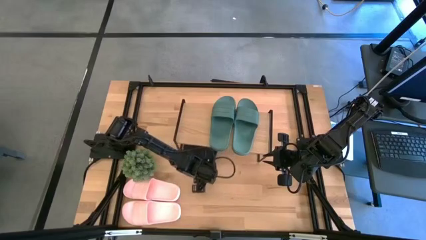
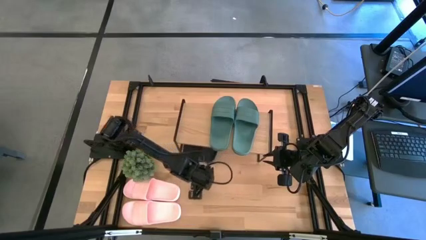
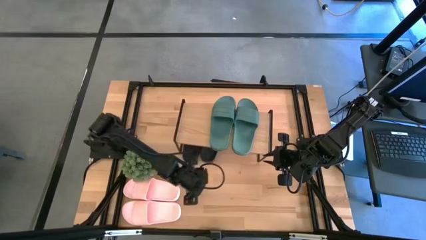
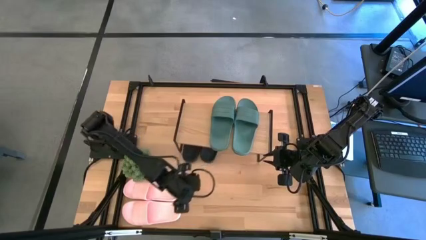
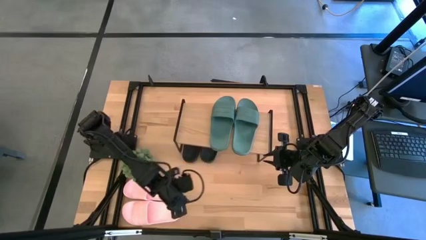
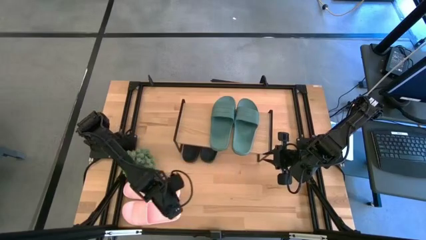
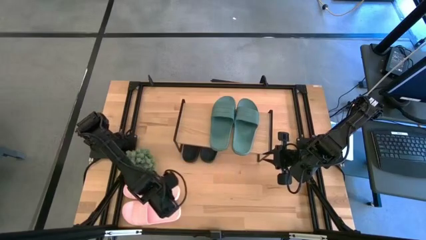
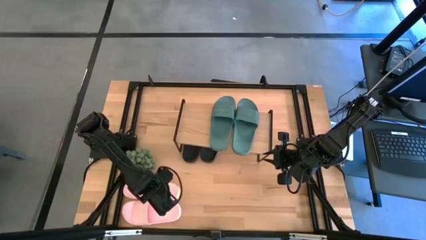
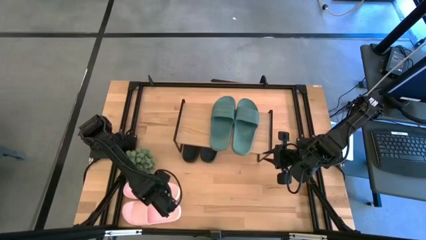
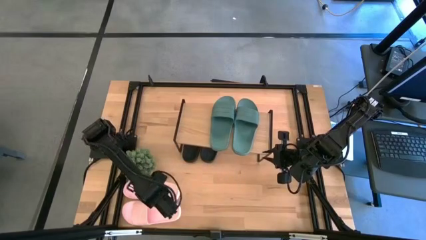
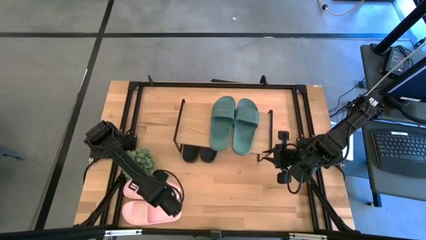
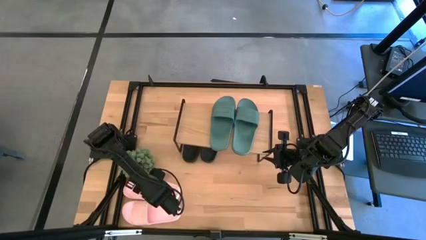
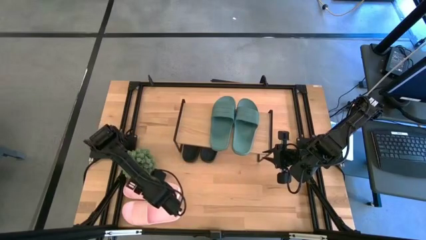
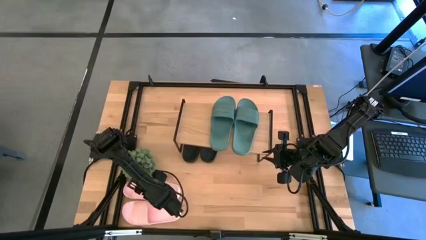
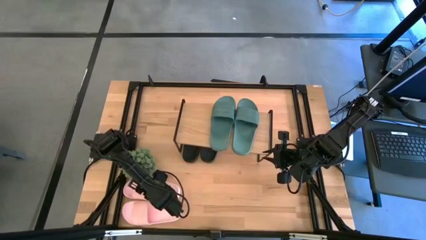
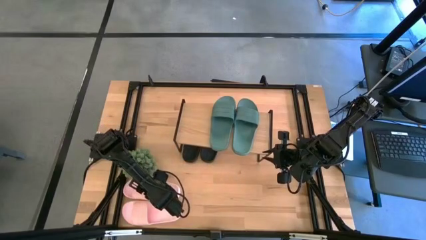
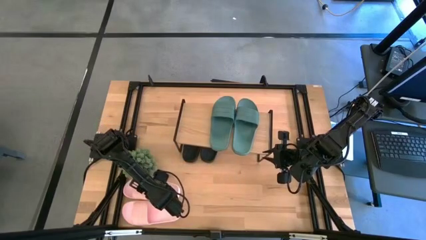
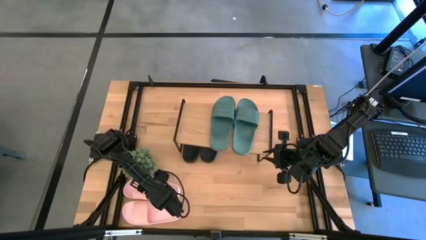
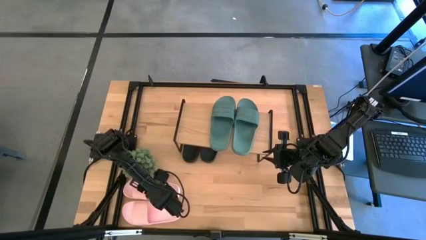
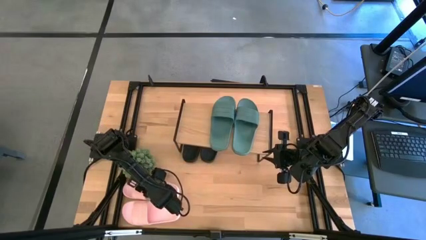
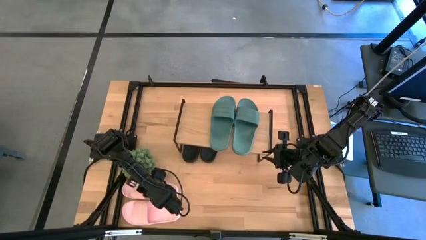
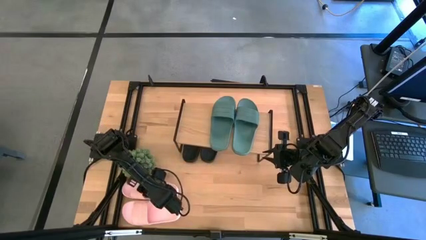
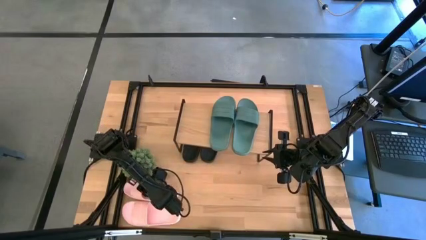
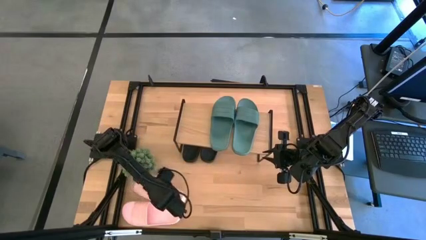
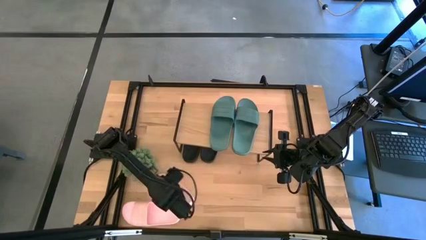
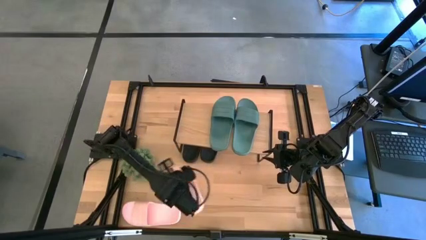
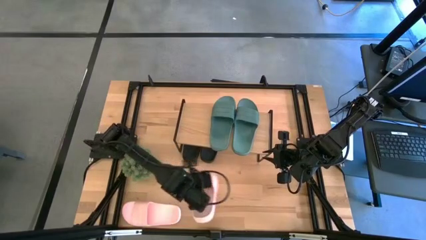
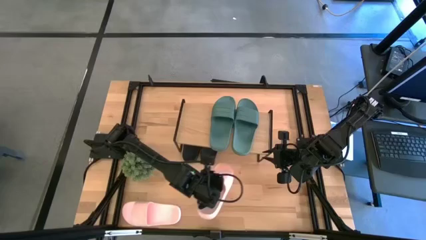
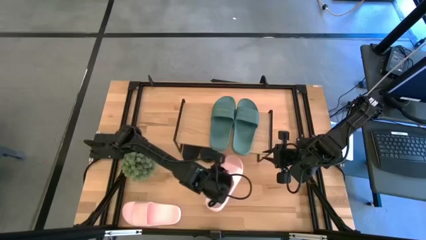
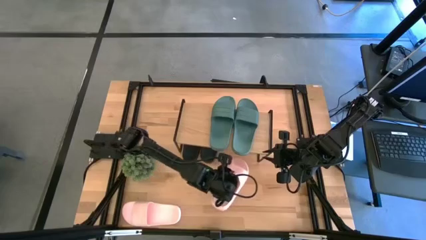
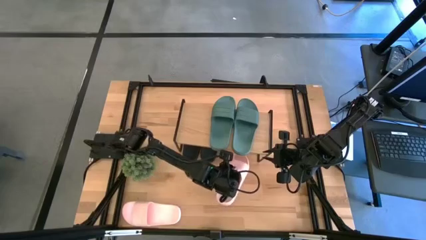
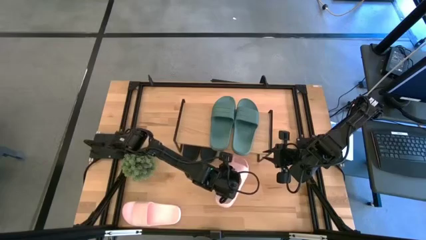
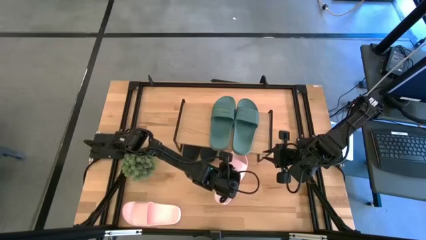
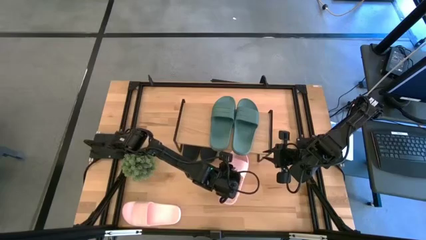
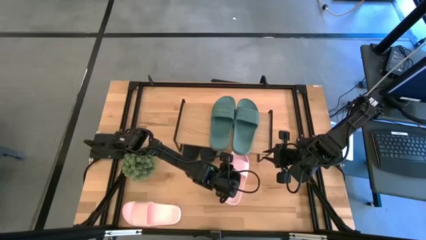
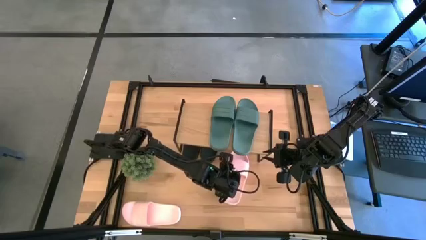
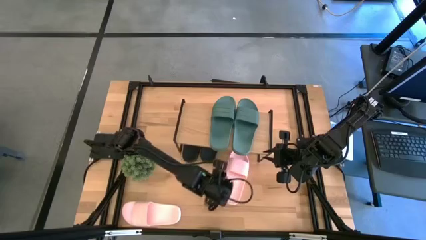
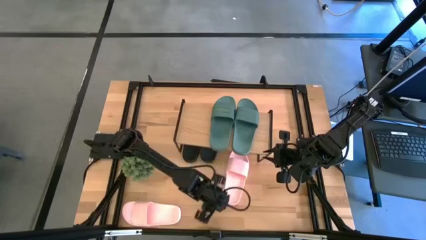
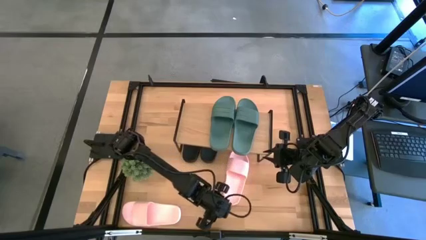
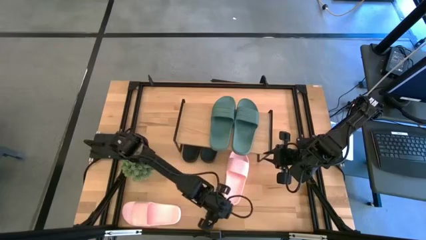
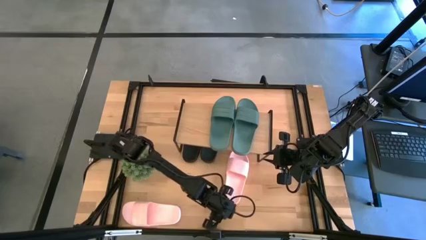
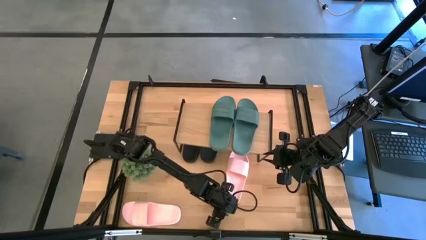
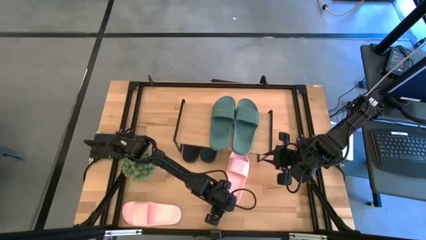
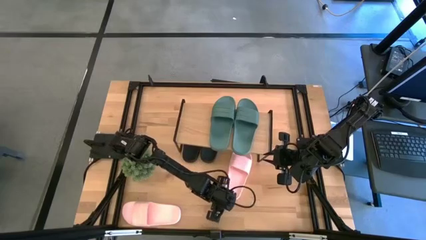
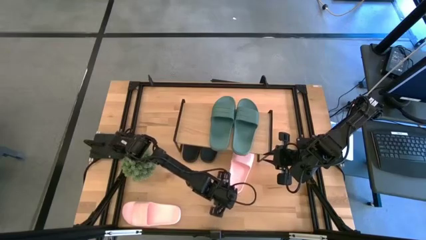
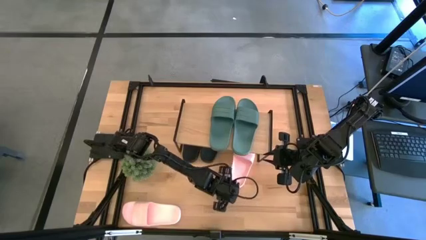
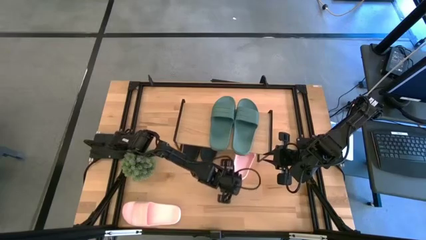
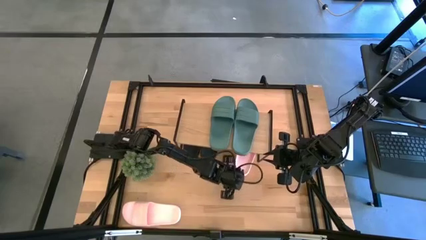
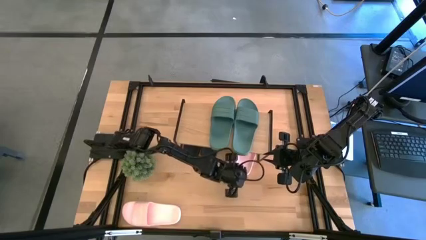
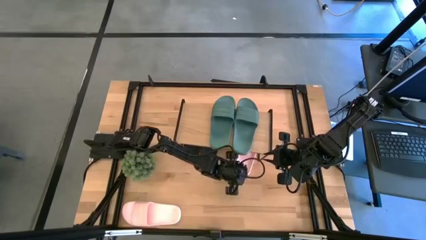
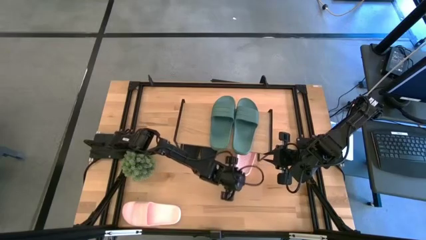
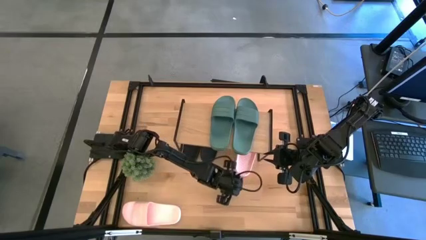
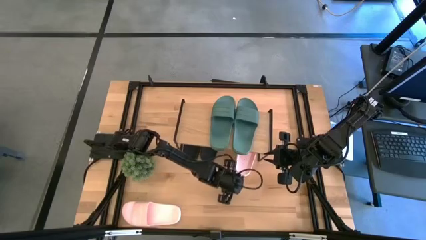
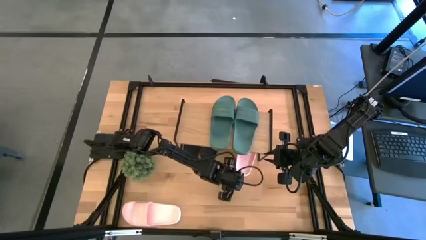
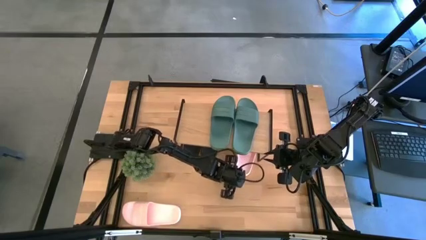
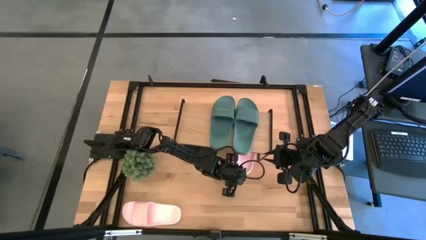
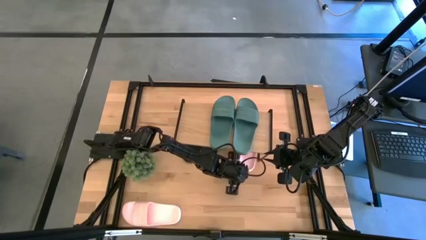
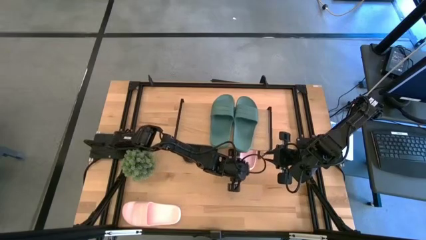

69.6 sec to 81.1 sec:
Task: Pick and place slides into the shelf
Put the right pink slipper under the shelf

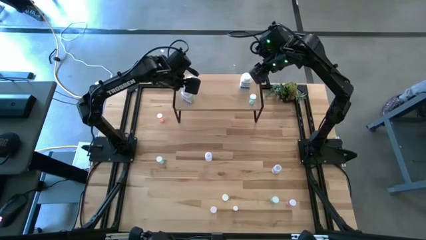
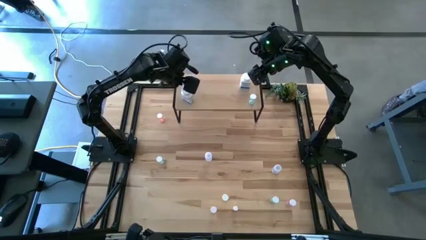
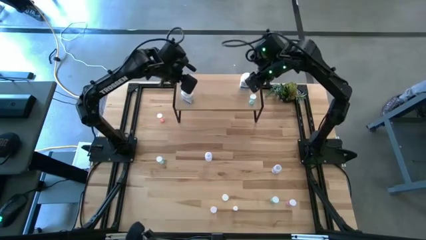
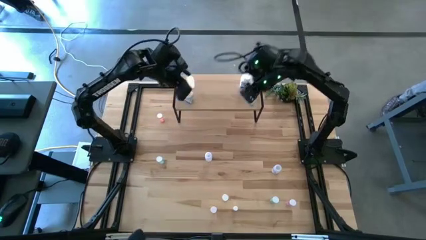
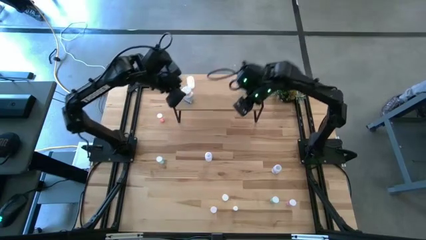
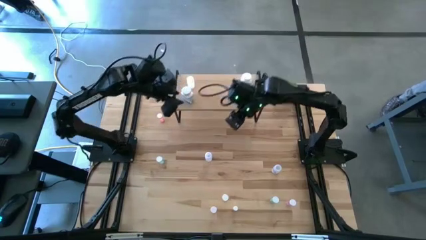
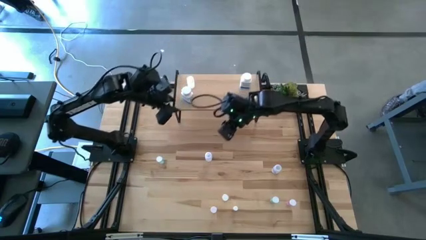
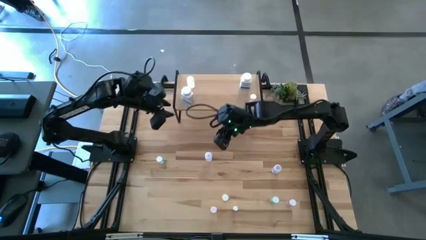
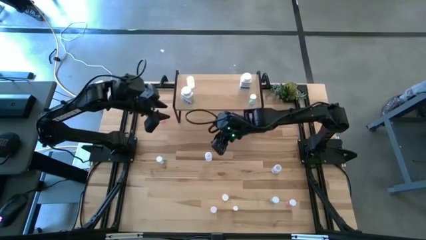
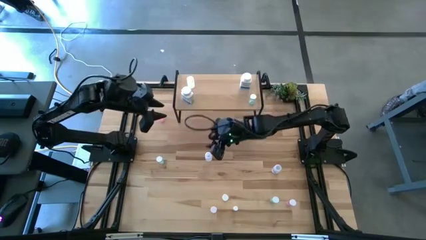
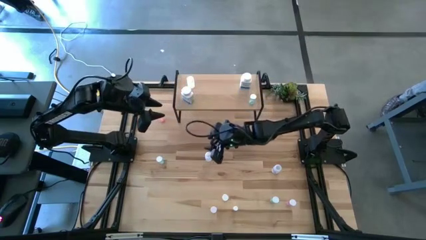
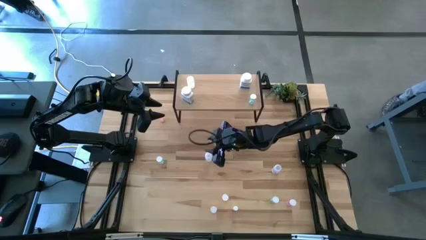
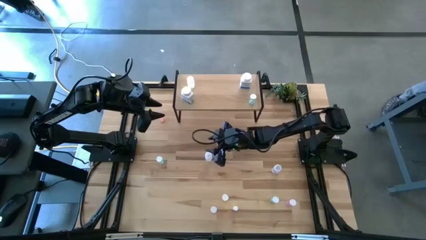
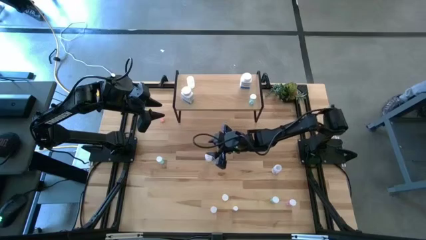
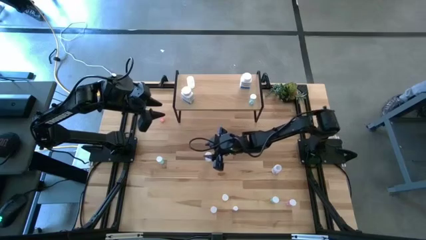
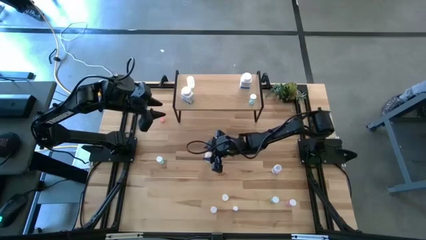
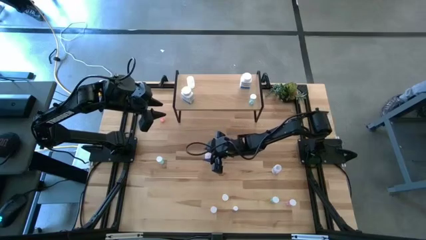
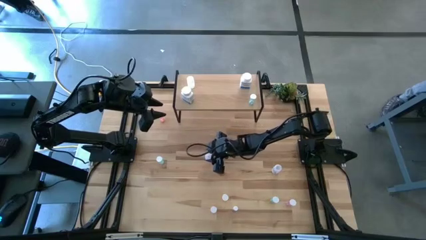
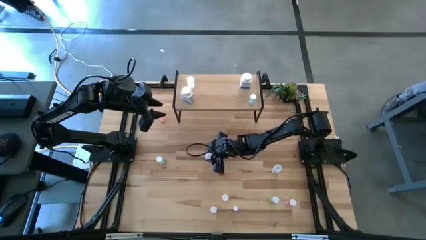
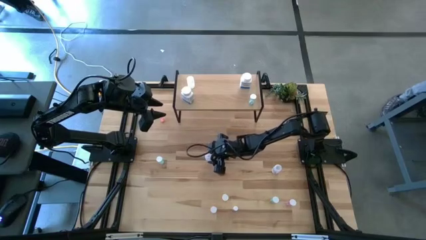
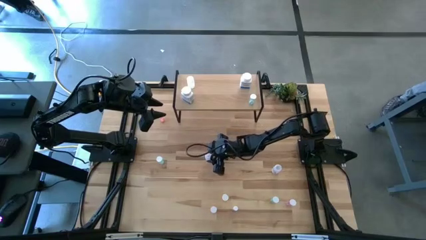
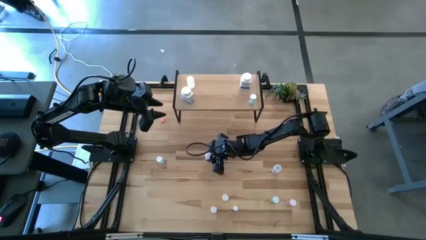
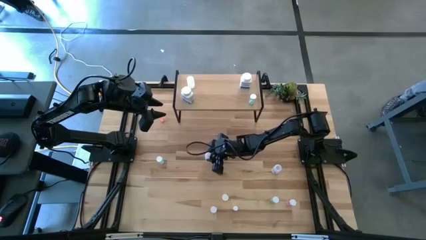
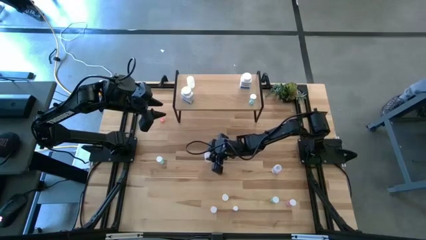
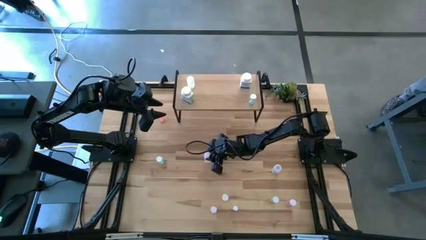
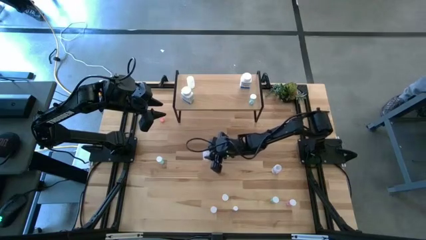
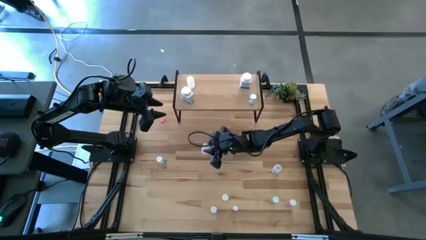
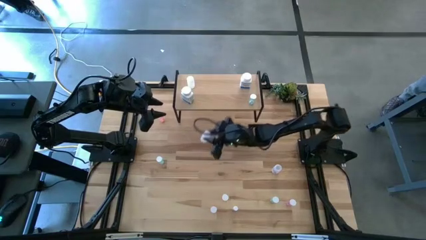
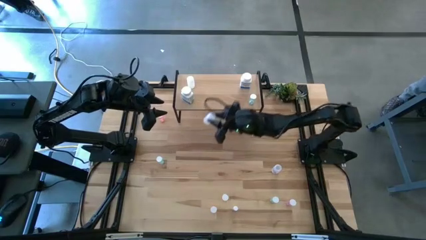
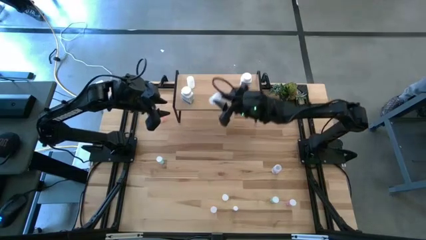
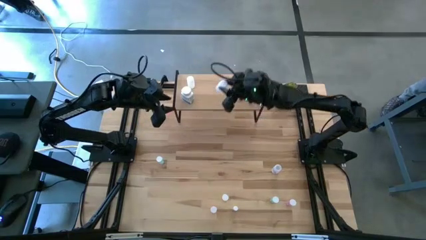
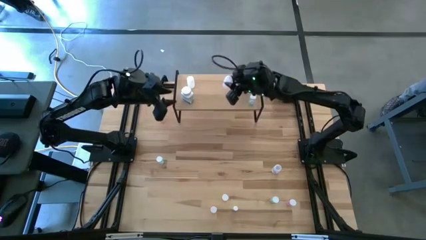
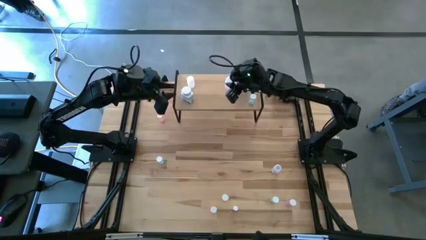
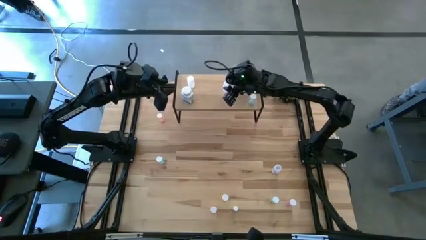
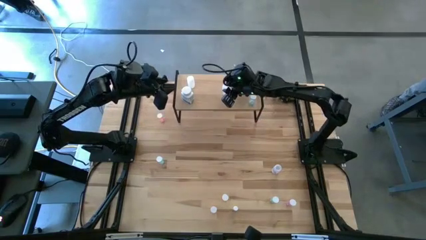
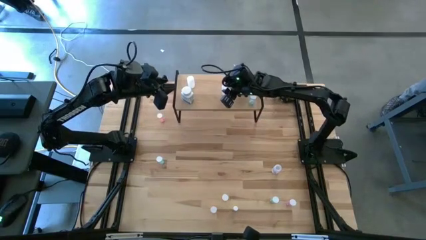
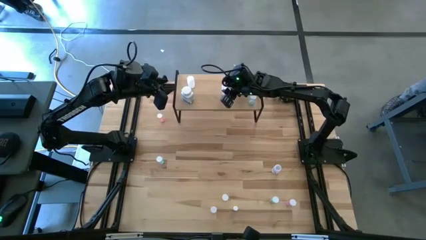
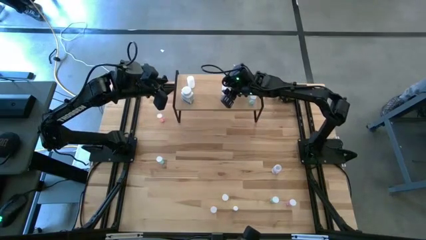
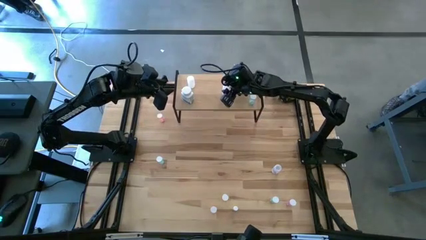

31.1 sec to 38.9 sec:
Task: Pick and place medicine bottles onto shelf by color
Put the left transparent pill bottle on the shelf
